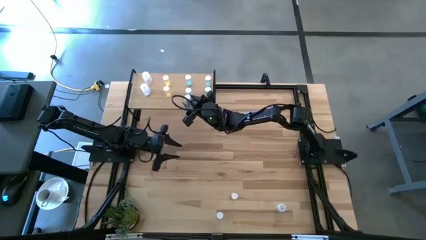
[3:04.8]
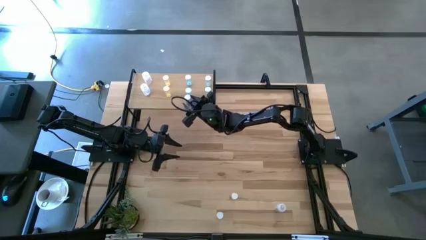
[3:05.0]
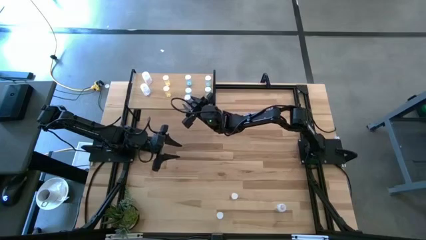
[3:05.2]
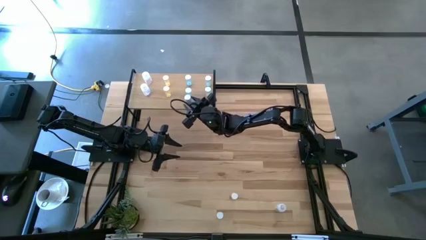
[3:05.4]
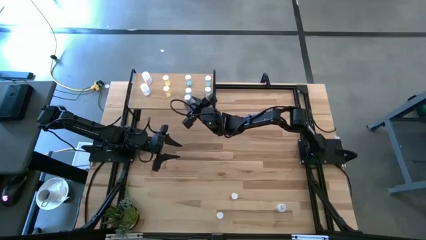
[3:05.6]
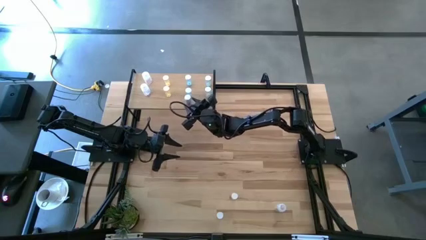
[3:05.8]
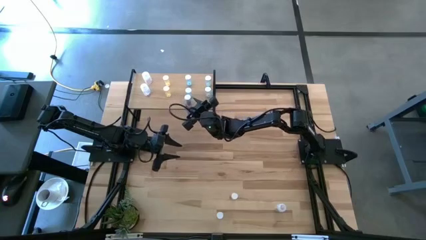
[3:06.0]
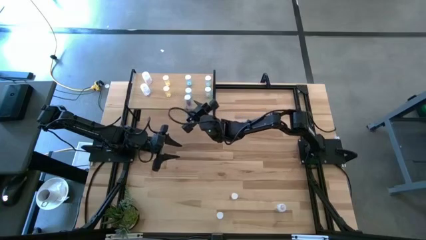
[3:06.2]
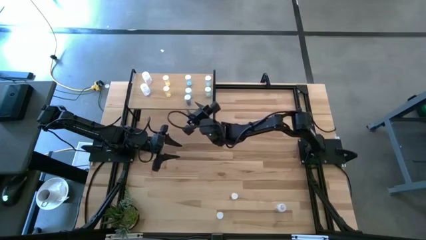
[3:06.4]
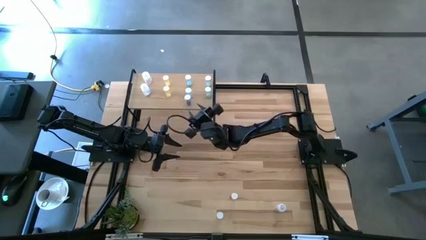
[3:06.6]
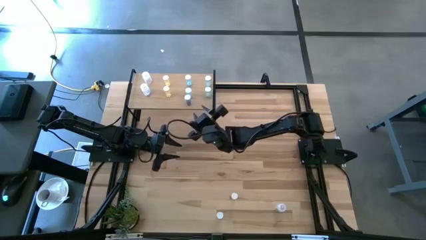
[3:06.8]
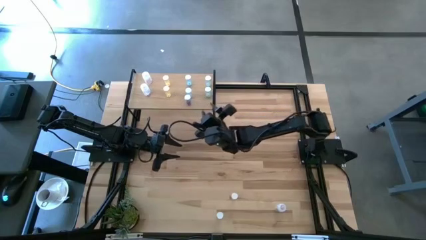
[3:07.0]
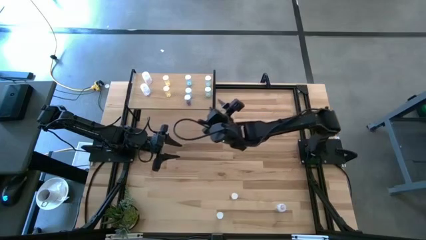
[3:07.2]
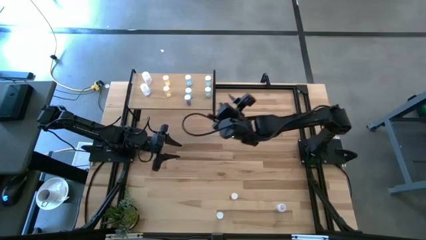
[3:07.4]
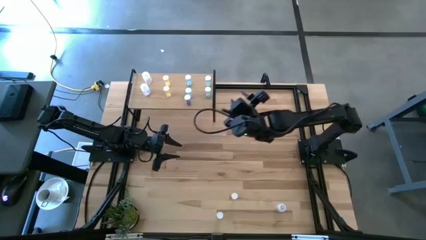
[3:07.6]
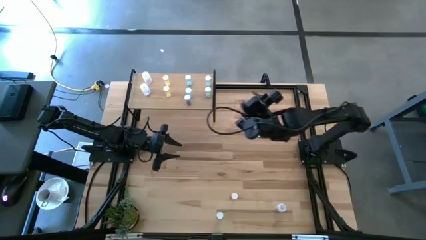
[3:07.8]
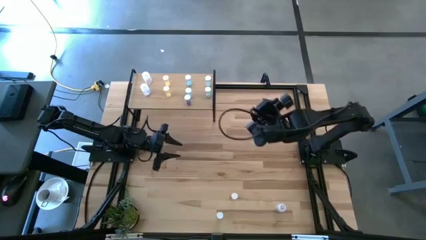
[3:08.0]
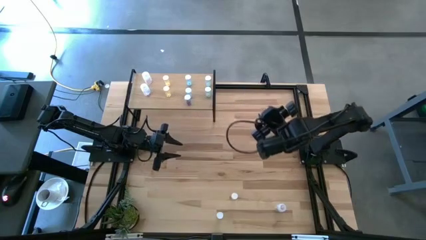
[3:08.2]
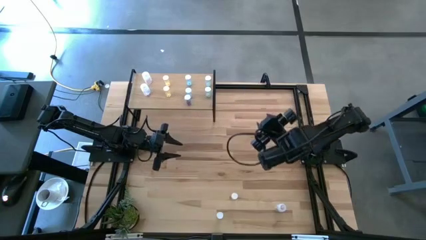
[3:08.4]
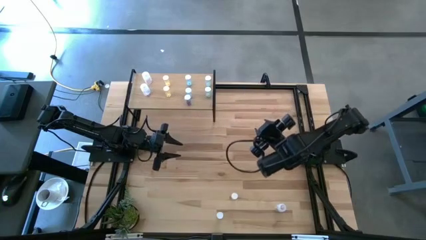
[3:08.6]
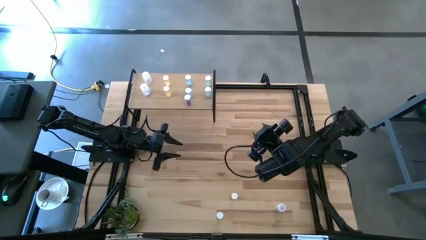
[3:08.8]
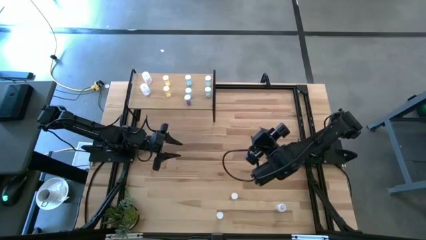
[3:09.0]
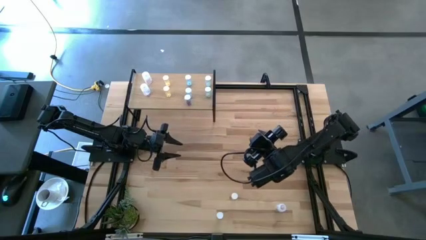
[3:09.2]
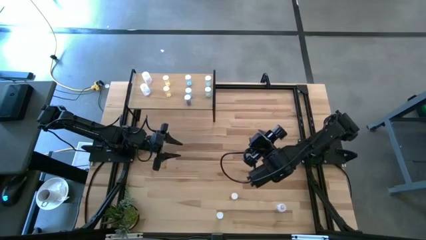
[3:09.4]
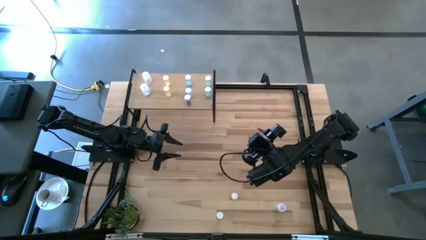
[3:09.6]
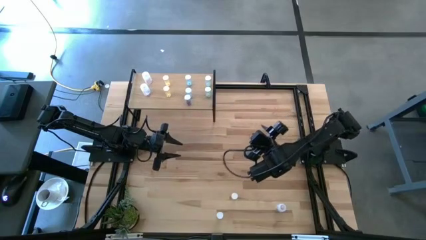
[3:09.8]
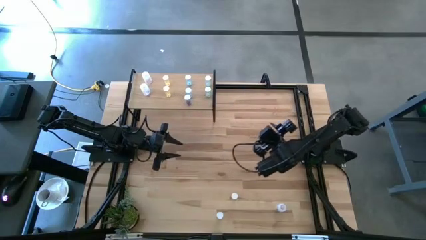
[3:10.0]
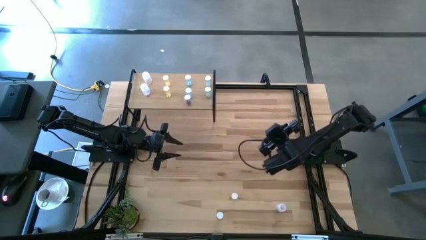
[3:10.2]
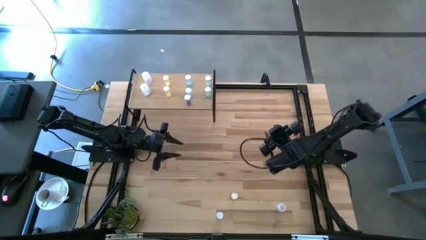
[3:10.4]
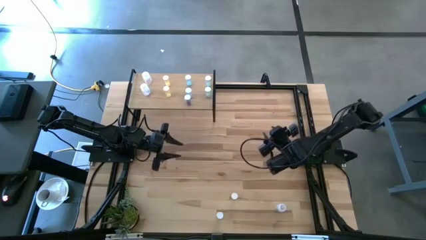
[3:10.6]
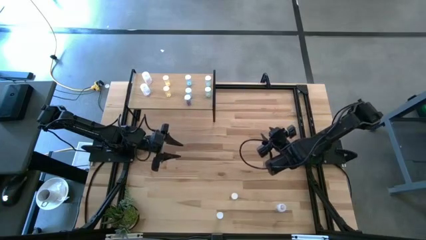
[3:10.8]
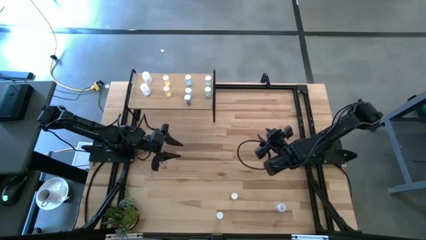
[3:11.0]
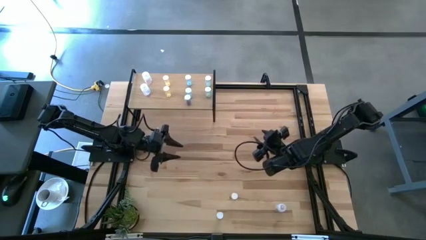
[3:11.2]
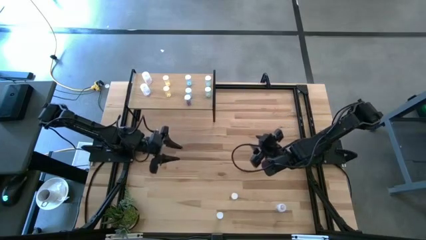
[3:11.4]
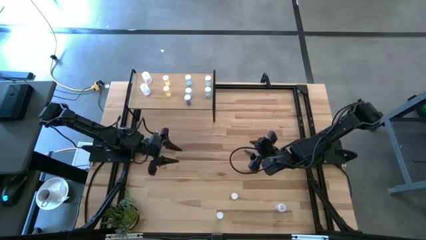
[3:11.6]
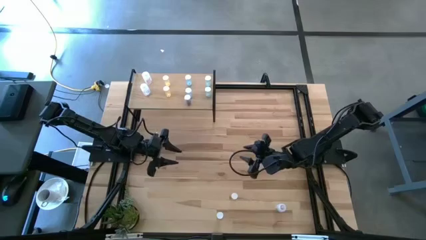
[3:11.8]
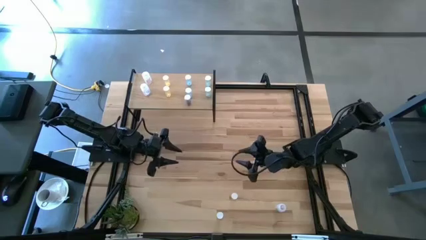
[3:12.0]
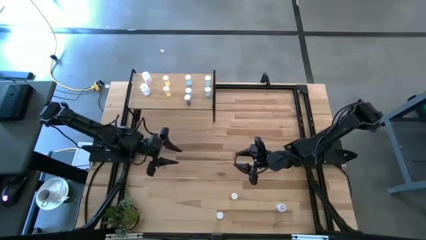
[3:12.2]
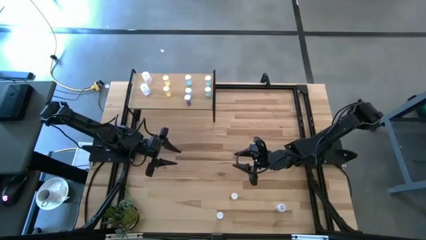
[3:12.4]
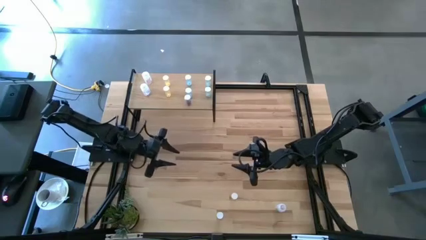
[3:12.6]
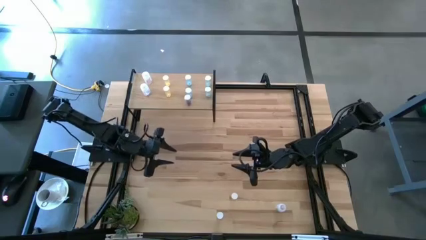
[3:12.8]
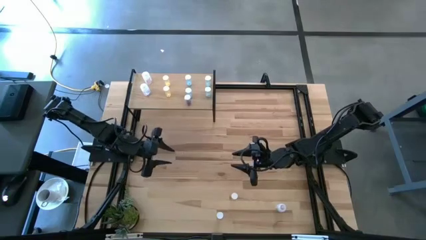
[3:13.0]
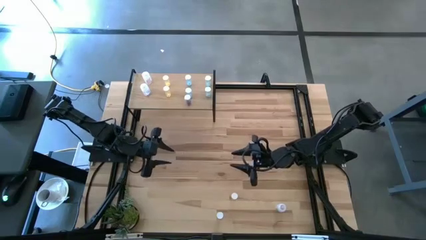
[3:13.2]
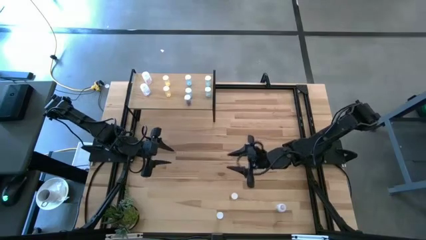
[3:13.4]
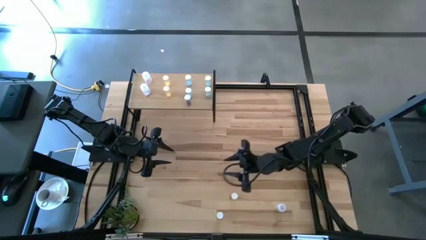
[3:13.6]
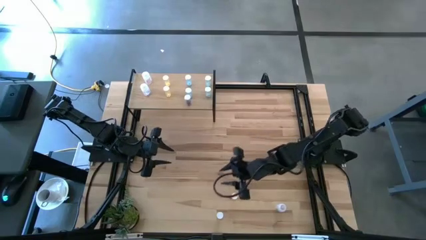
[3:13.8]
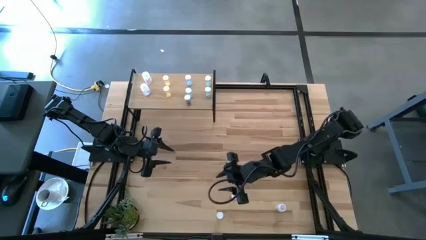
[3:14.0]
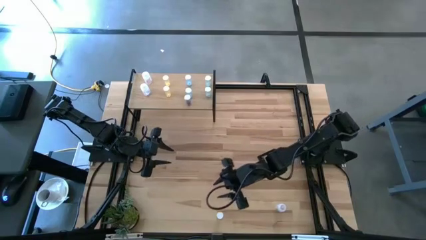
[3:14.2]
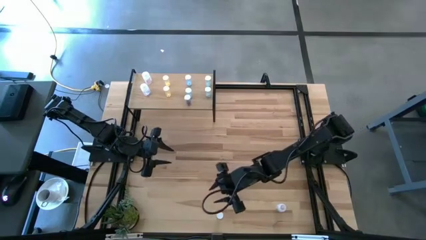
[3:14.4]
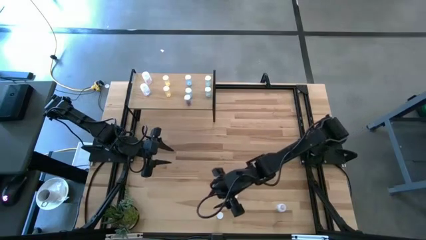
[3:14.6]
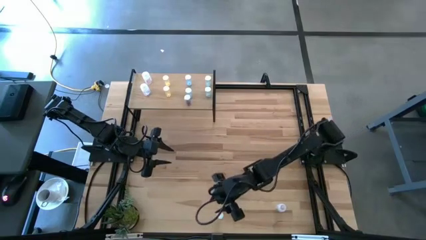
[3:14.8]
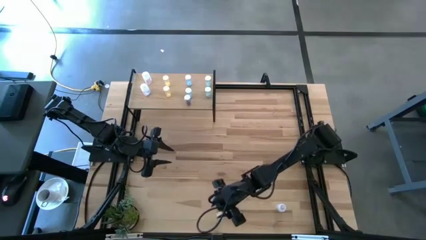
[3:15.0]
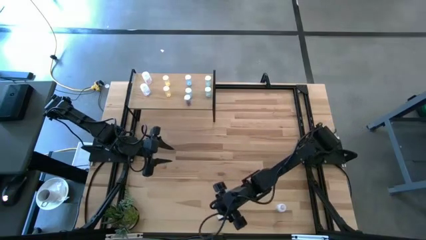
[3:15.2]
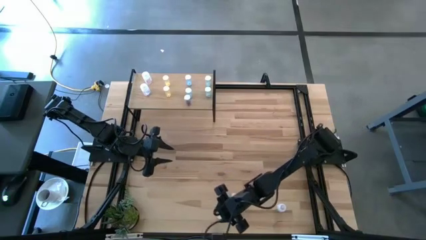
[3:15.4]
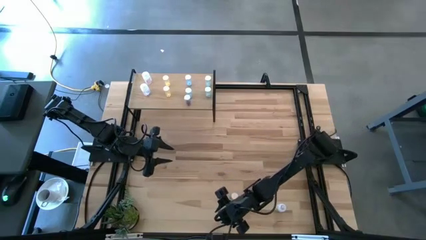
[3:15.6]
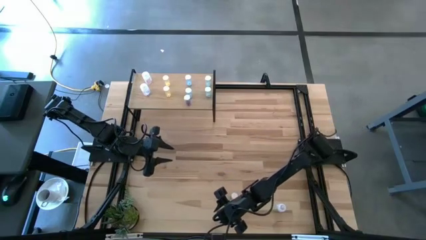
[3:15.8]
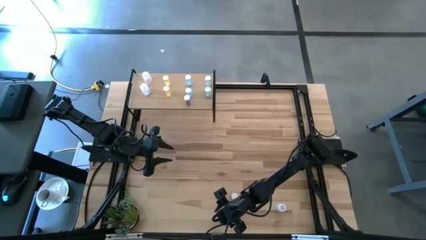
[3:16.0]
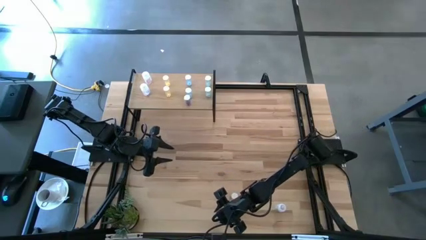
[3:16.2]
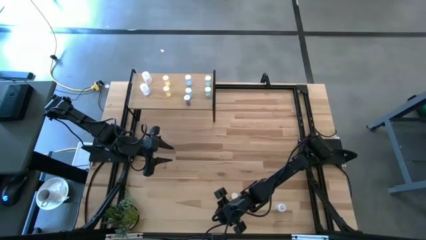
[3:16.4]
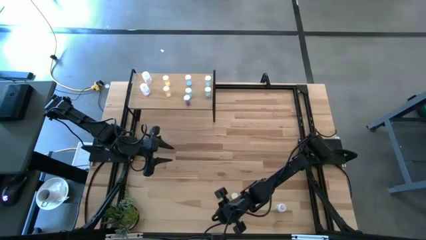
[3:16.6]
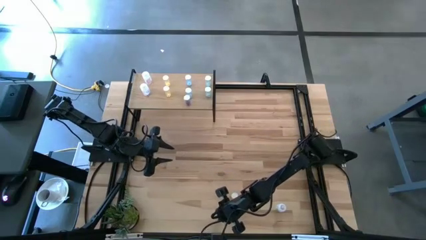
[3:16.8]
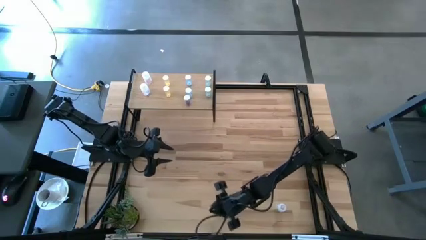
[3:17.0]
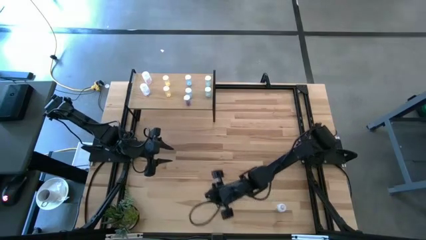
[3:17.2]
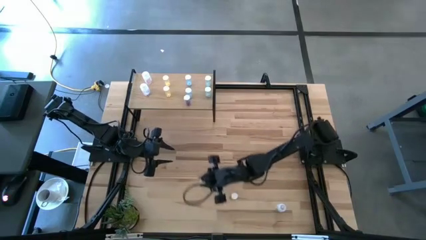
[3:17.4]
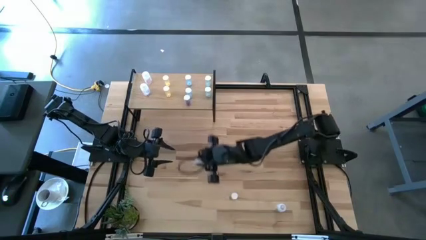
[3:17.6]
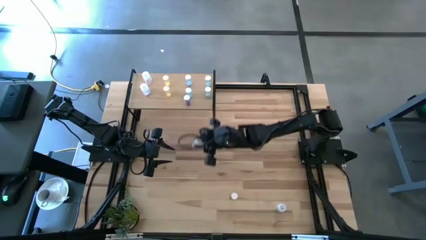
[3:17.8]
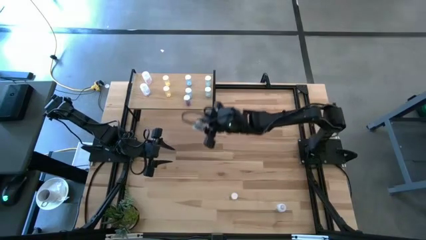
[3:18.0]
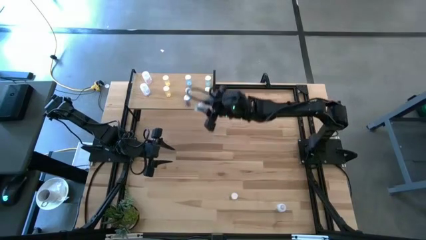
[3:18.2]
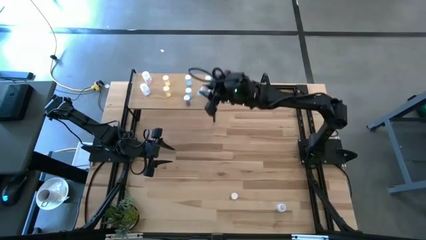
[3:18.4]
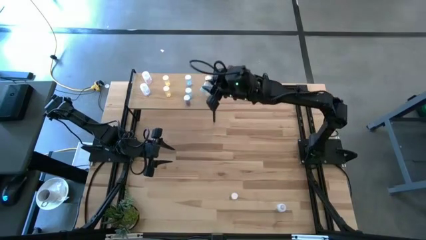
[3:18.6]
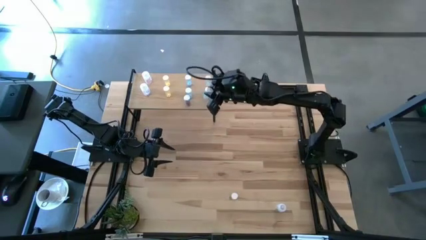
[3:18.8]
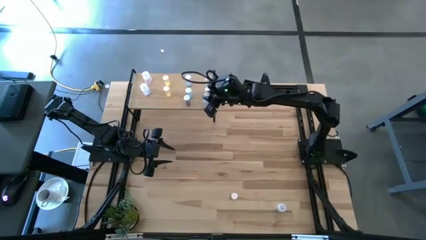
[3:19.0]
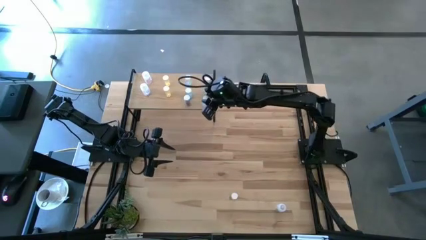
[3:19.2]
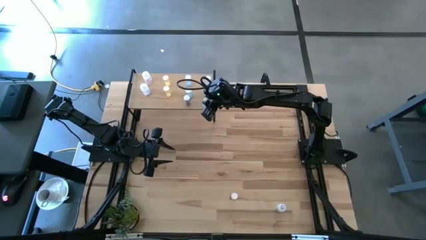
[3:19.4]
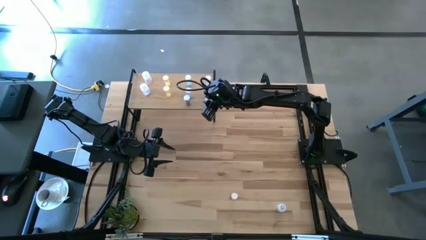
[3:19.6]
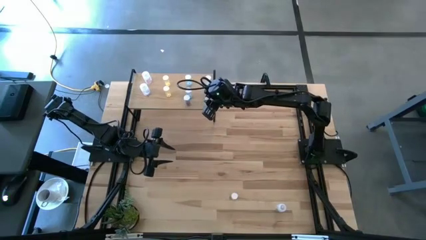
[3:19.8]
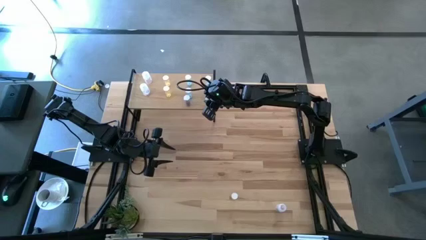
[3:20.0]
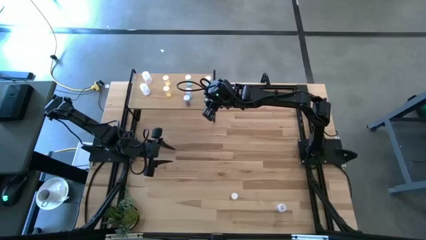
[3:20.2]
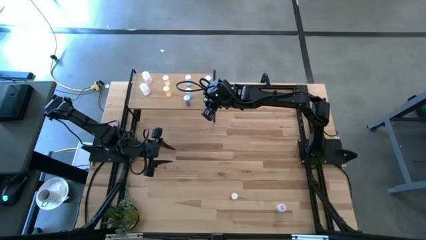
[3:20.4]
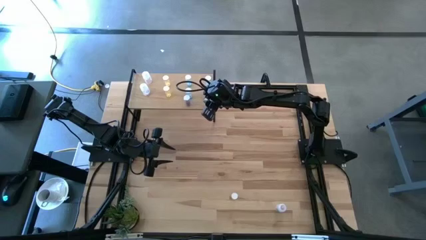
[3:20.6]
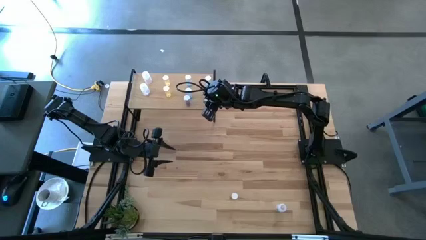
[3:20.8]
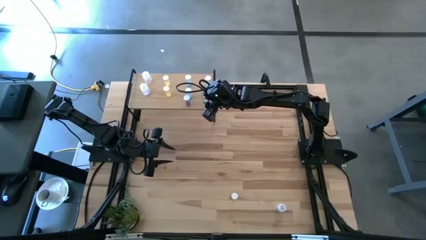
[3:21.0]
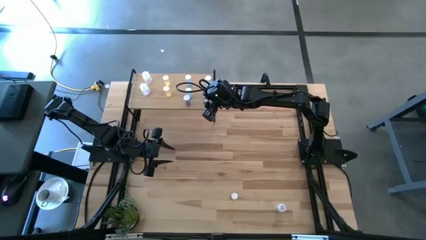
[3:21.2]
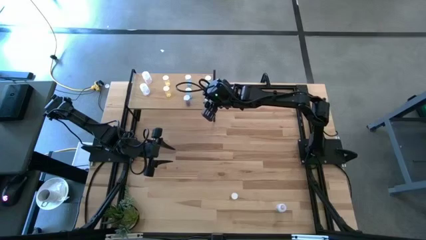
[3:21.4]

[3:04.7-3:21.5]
Task: Pick and place medicine bottles onto shelf by color
Put the green pill bottle on the shelf aligned with the other green pill bottles
